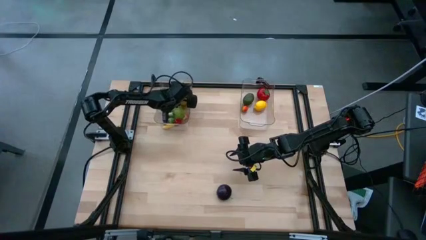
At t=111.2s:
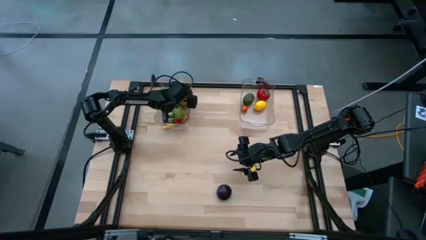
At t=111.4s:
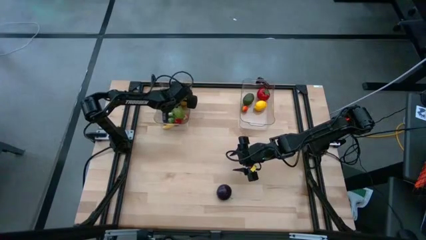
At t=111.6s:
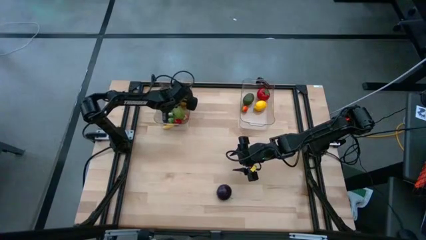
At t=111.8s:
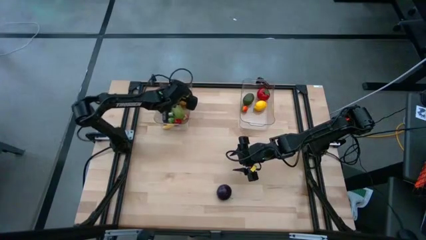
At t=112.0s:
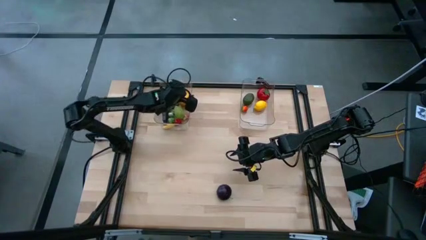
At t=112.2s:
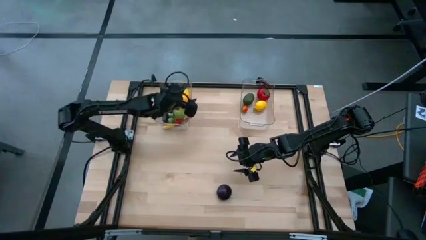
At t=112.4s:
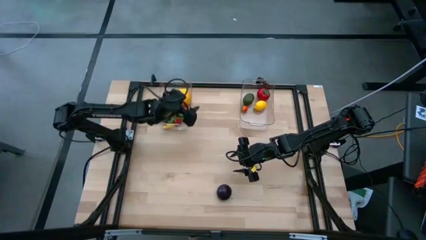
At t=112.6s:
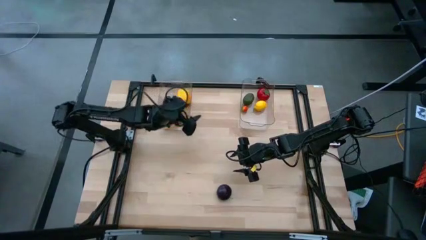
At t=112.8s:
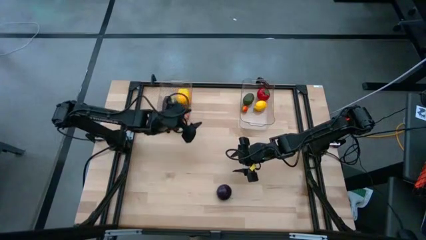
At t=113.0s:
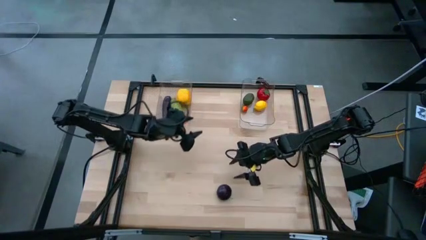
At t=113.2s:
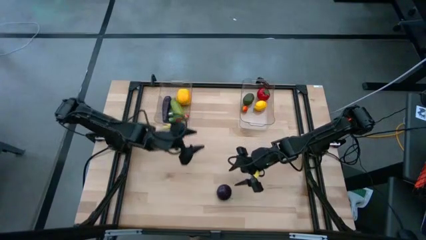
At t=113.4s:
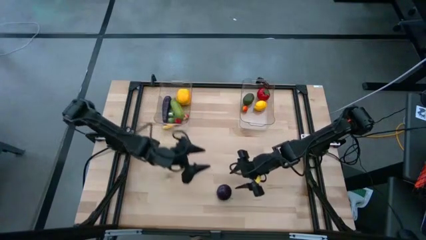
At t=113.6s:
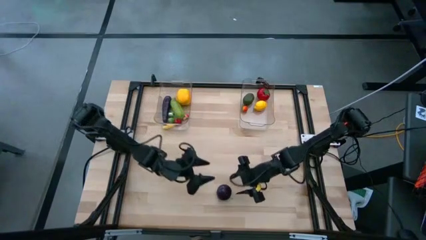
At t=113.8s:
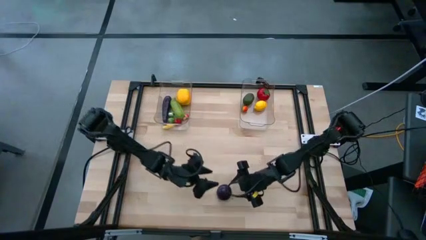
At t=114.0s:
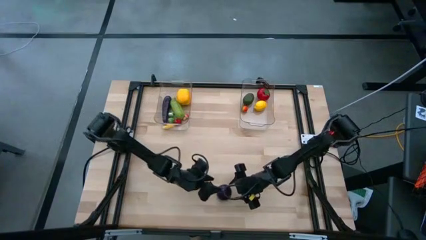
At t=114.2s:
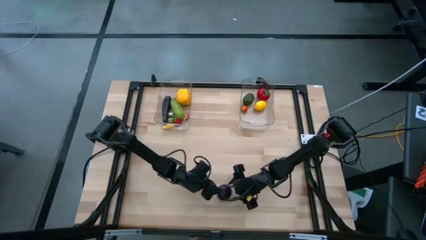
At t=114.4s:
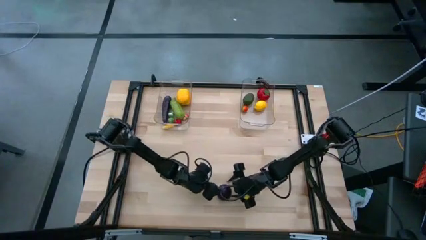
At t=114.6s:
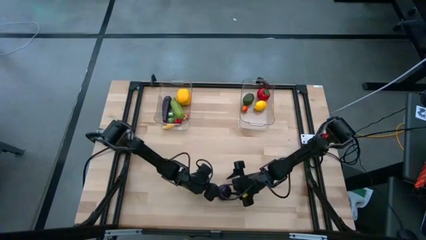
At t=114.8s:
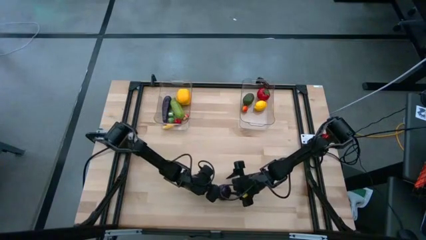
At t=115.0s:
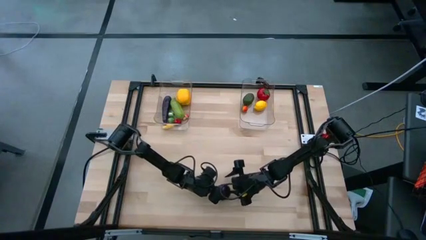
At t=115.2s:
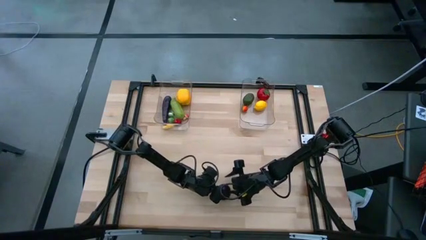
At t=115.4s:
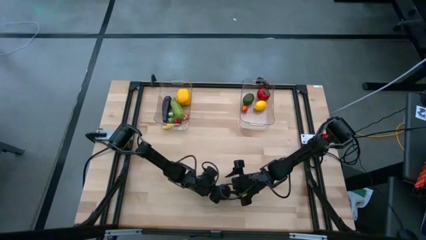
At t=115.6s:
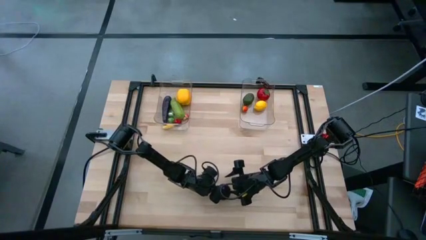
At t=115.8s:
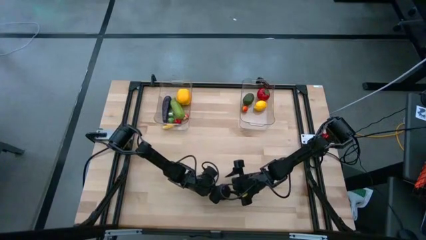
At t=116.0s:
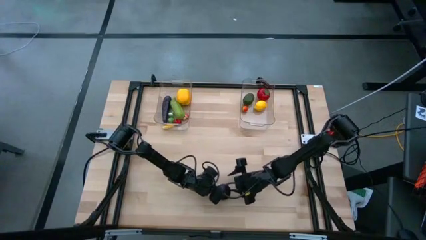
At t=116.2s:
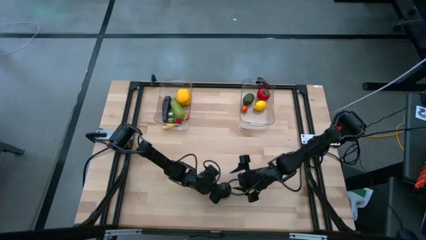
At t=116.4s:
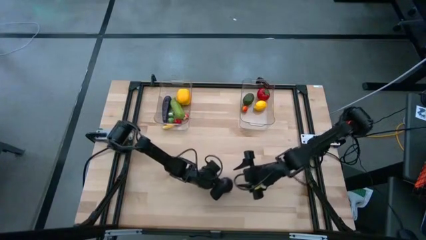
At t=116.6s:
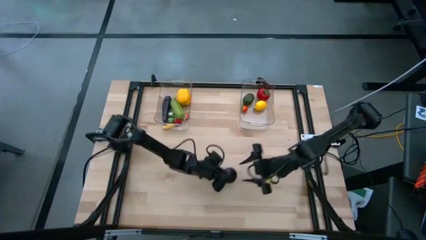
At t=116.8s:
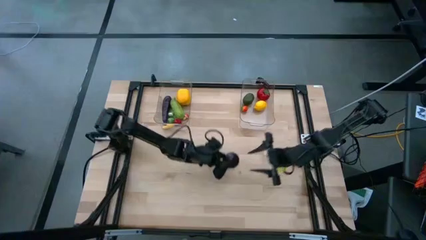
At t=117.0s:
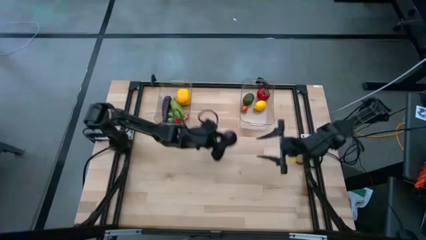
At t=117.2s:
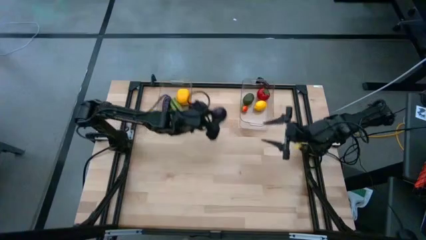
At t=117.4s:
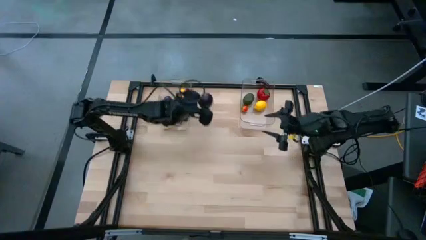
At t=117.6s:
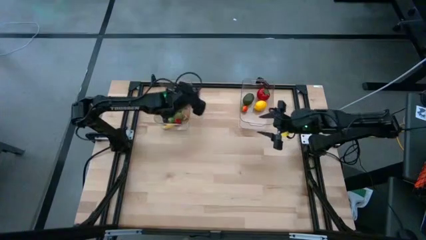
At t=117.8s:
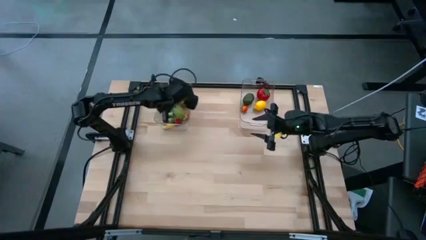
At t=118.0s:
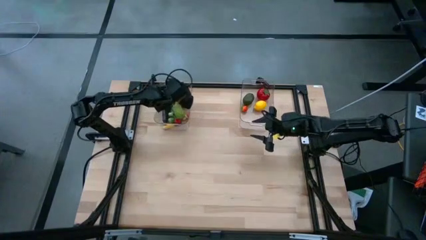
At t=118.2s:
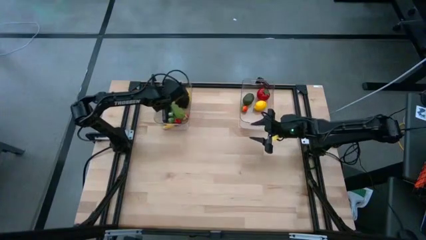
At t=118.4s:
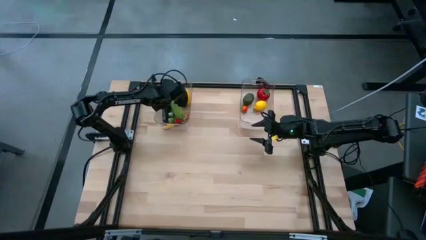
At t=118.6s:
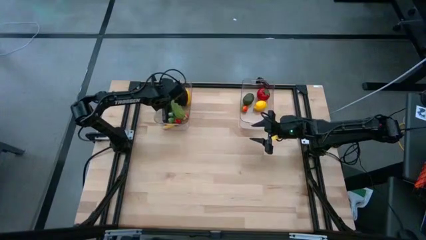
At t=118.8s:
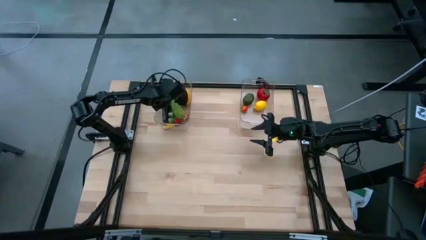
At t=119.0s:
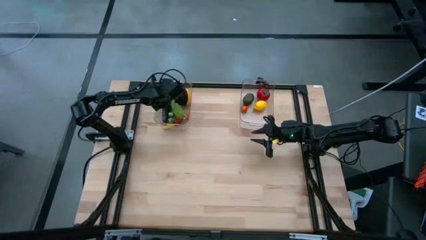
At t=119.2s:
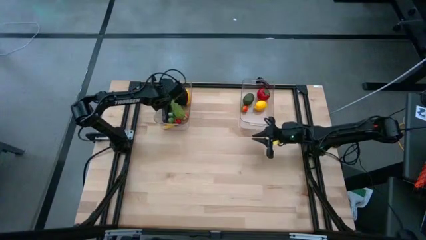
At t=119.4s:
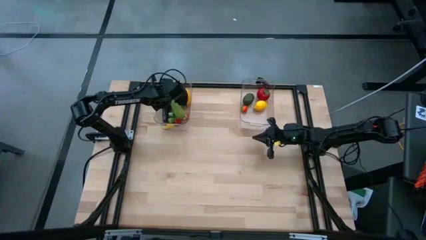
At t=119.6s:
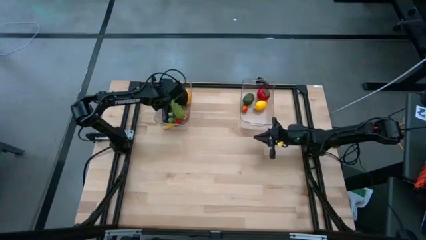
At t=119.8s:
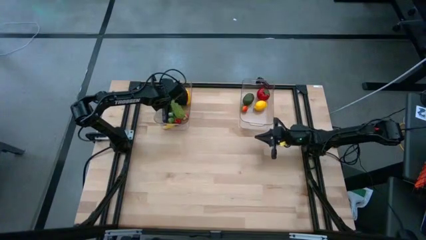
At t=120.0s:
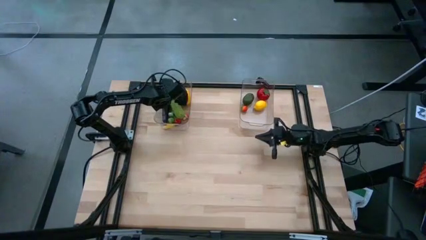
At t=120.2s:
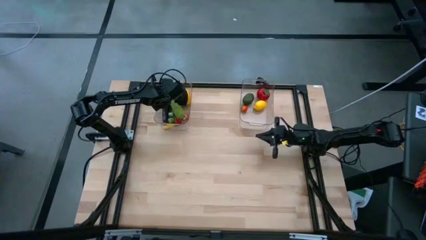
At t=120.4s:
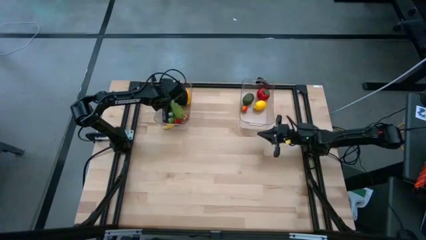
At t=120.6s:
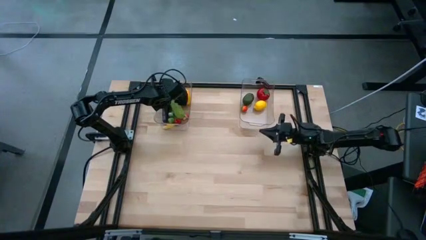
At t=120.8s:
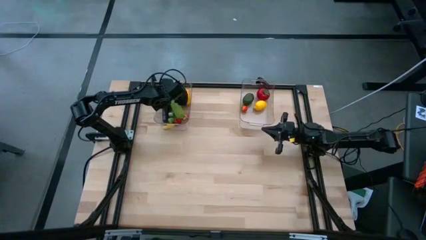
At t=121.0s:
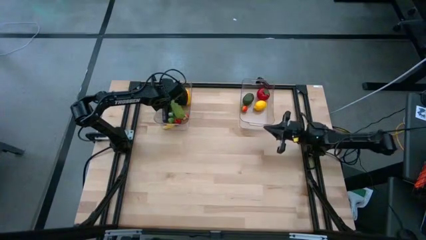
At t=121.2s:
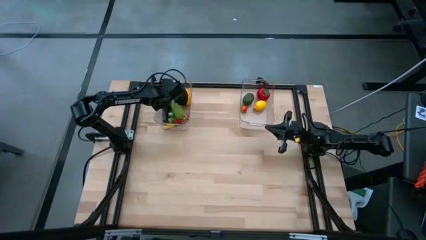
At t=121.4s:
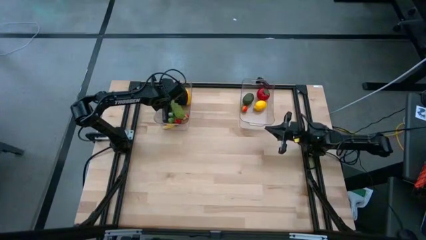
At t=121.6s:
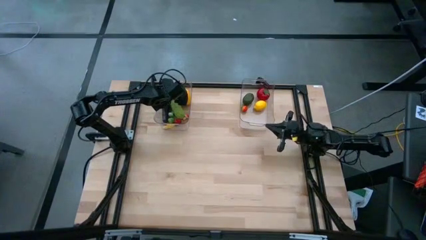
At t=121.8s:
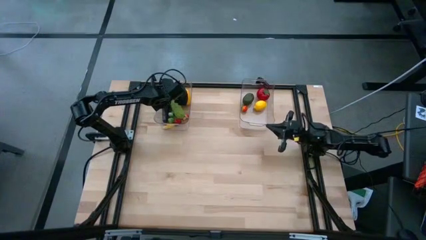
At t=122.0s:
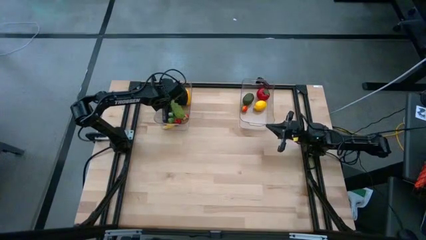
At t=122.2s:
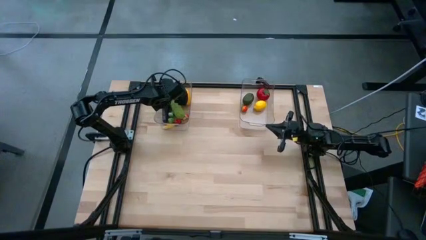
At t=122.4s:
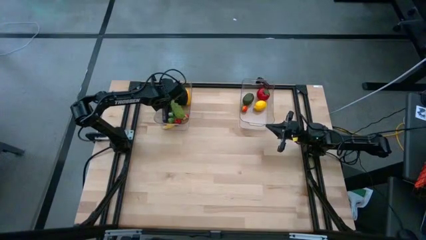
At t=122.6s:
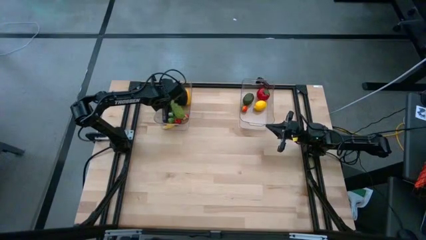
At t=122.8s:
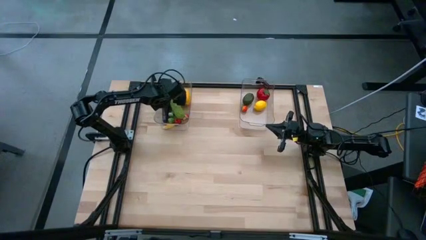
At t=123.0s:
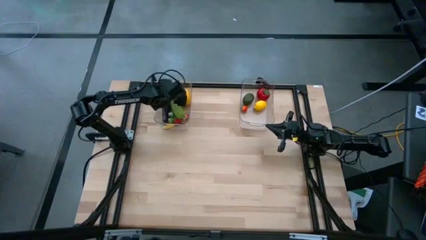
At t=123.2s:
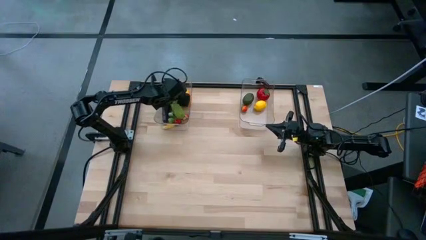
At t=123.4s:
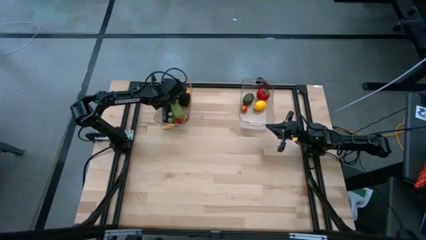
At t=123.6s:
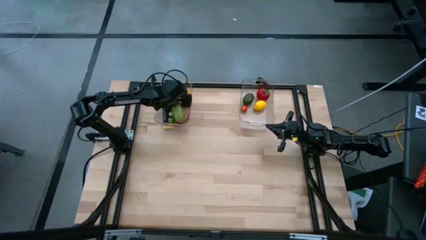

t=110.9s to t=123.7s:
Task: Sort produce into baskets
Put the violet plum into the left transparent bin

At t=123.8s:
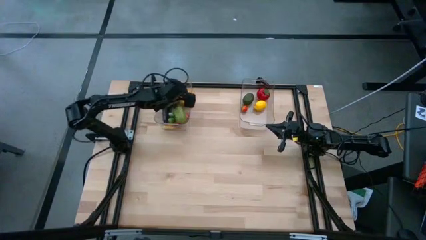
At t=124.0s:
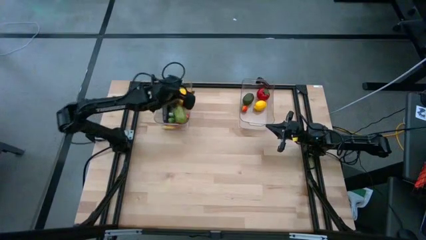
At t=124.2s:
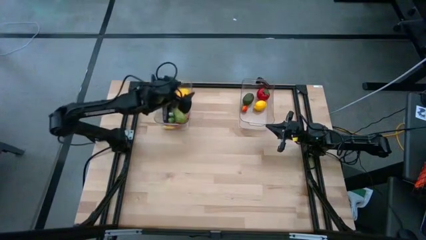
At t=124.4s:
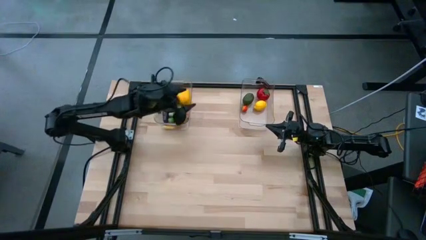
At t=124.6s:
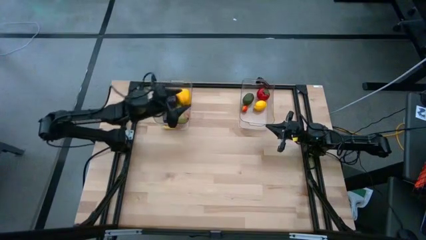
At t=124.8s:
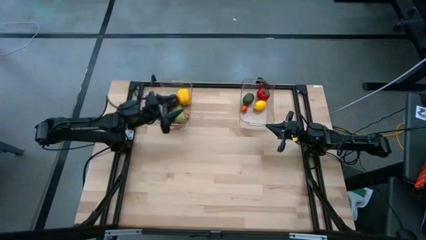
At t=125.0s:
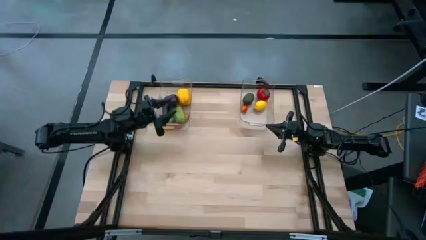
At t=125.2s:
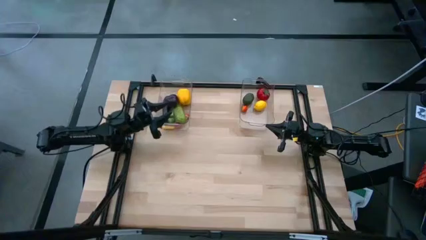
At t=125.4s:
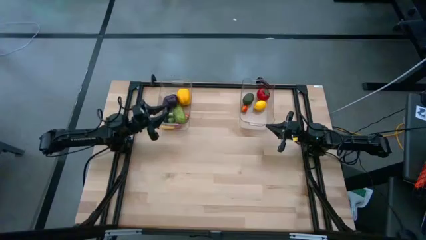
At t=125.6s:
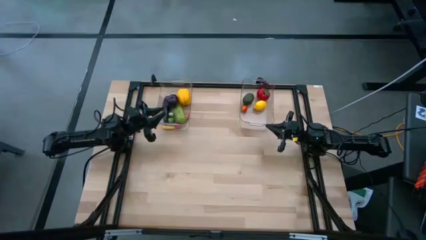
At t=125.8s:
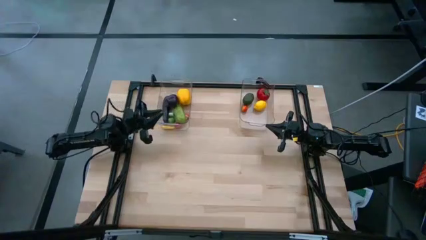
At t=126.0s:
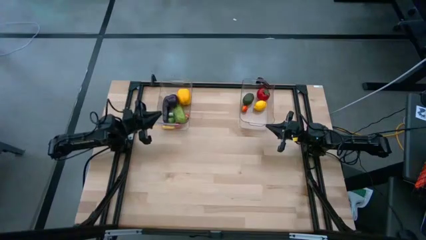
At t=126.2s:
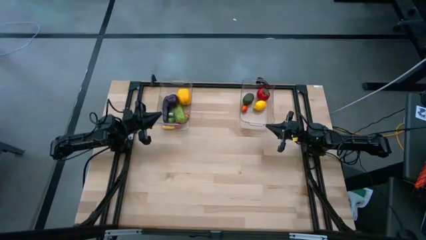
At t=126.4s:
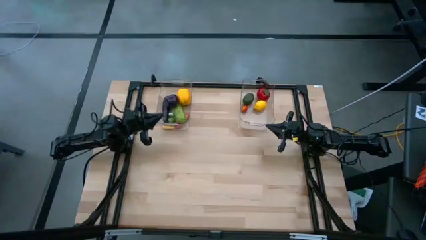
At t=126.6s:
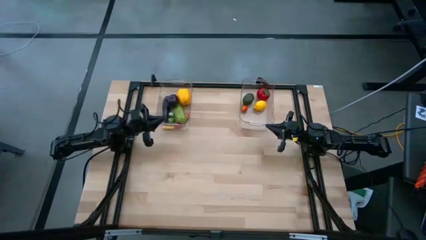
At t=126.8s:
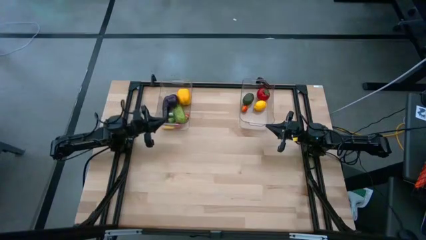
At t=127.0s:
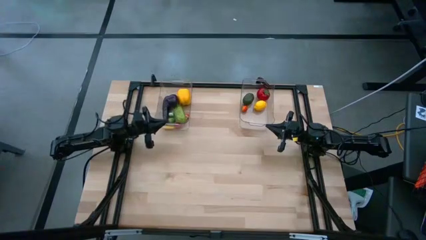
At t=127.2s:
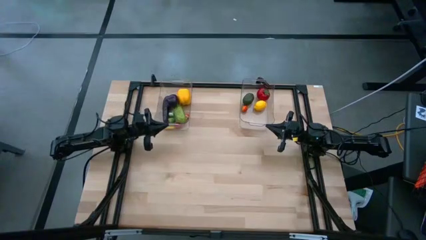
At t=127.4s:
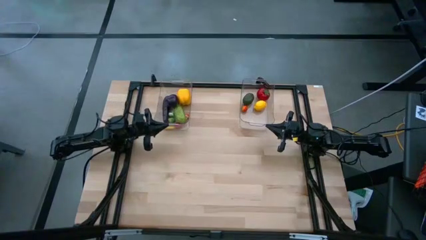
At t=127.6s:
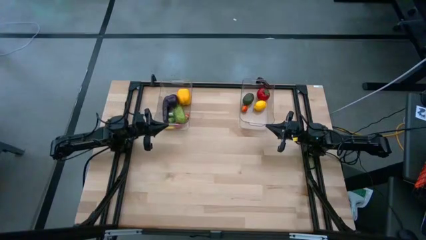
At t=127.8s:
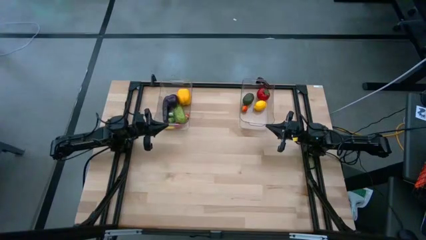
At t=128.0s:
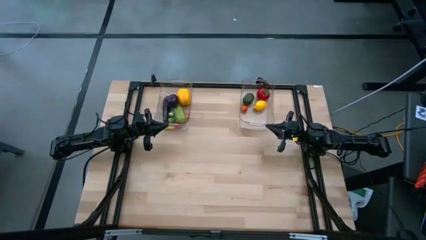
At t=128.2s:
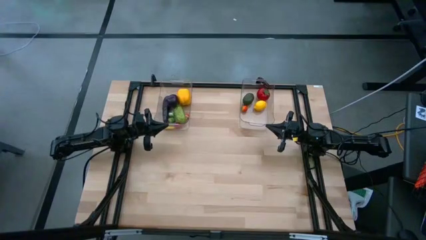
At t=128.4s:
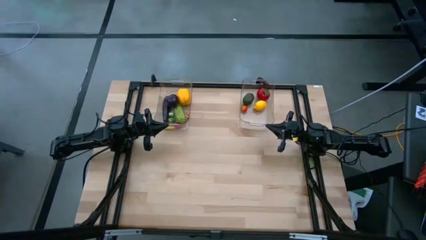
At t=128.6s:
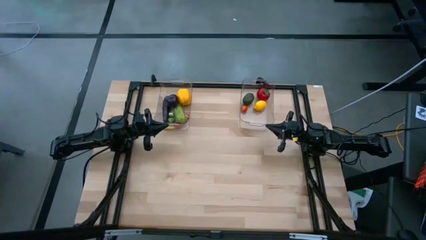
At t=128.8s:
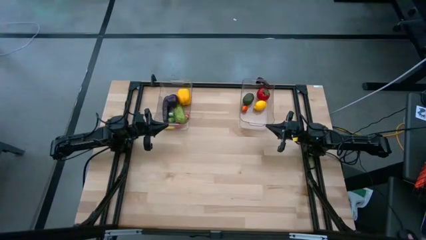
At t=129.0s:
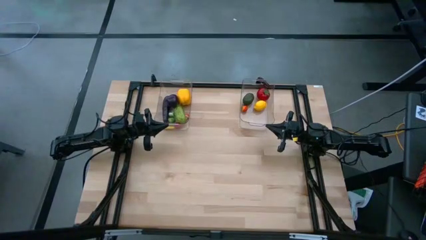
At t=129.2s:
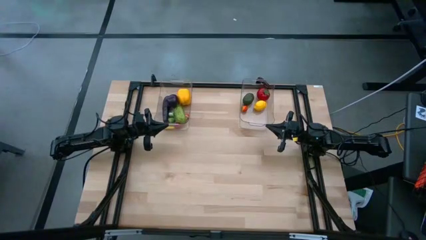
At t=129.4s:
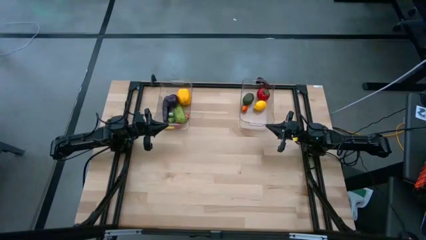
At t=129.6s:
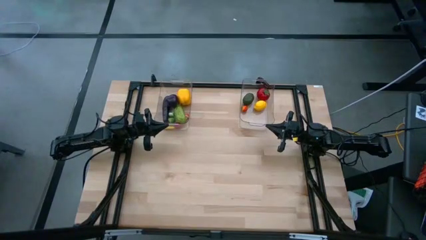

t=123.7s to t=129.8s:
Return to Home Position
